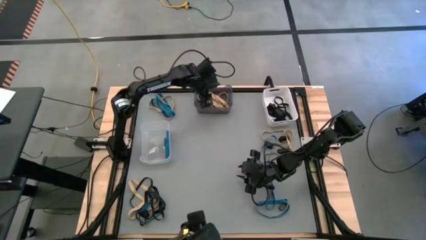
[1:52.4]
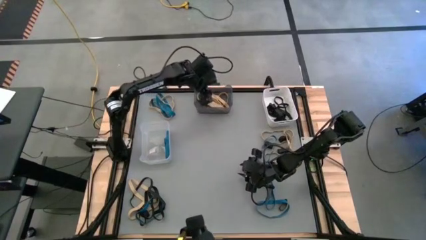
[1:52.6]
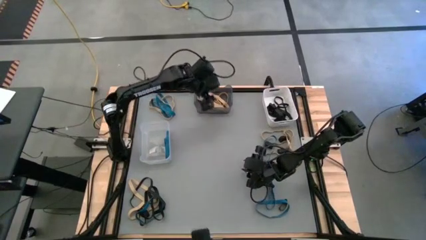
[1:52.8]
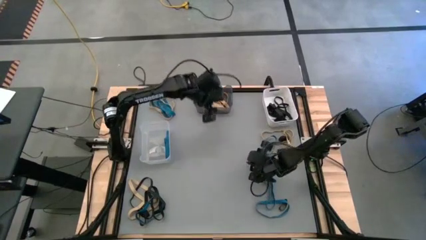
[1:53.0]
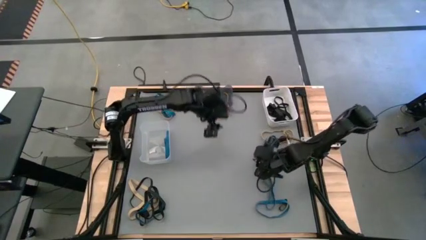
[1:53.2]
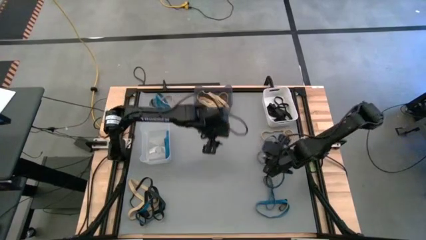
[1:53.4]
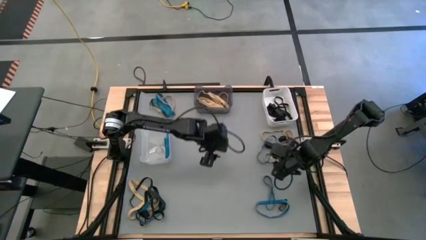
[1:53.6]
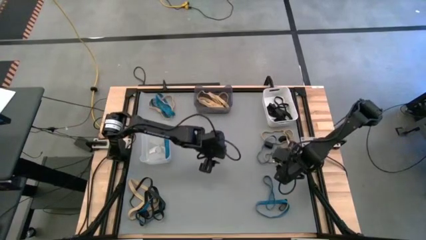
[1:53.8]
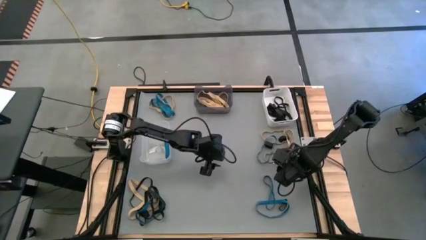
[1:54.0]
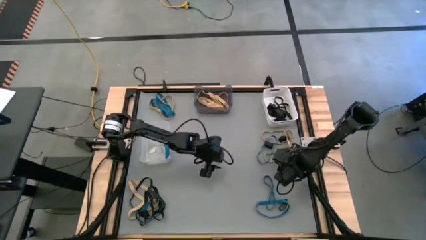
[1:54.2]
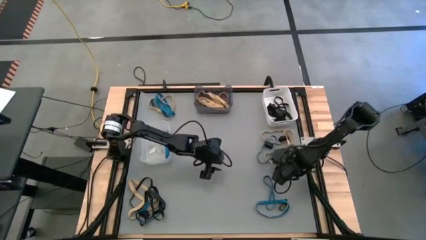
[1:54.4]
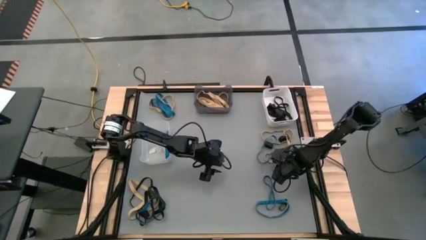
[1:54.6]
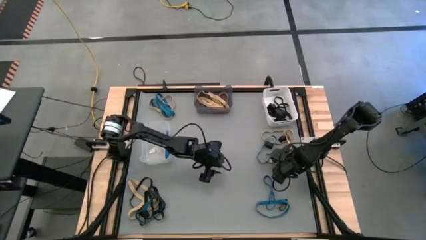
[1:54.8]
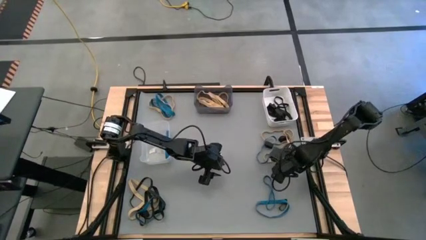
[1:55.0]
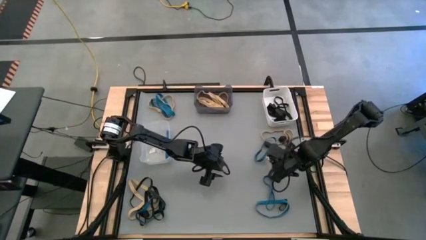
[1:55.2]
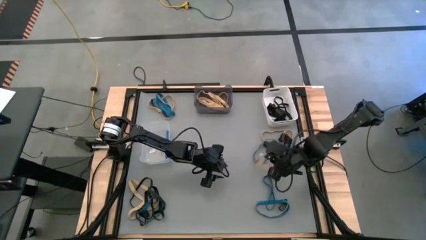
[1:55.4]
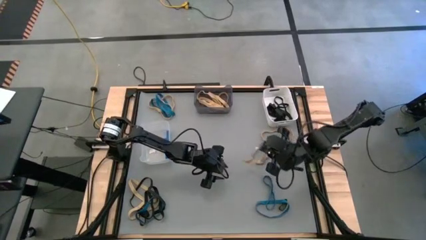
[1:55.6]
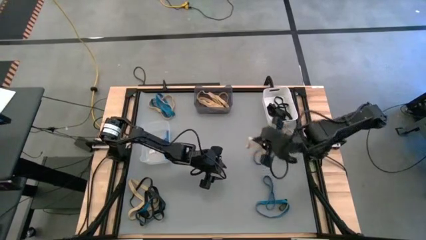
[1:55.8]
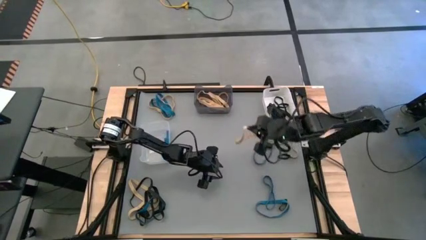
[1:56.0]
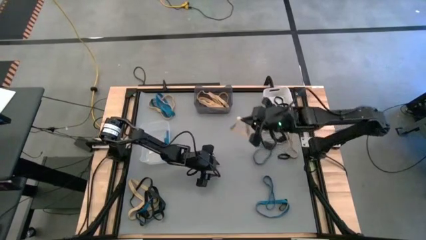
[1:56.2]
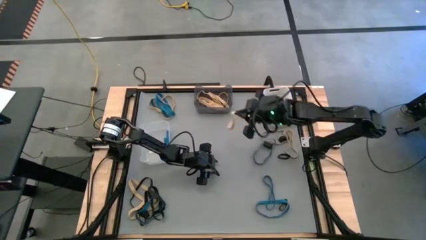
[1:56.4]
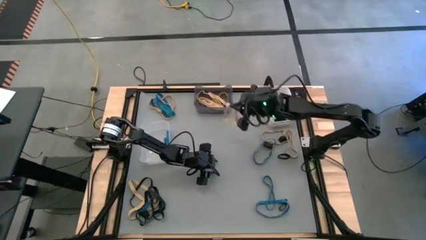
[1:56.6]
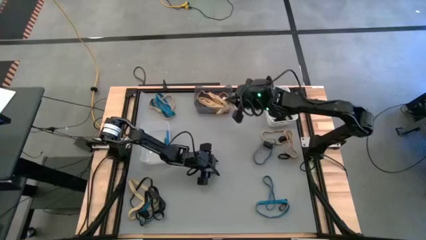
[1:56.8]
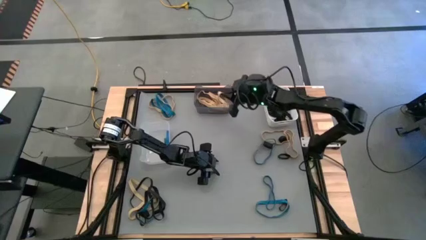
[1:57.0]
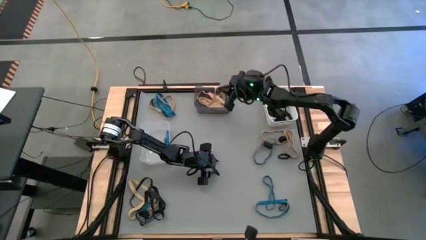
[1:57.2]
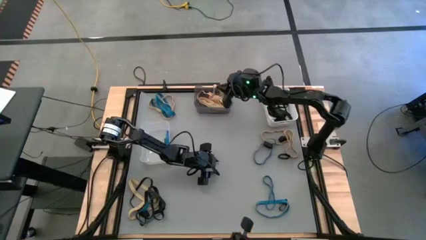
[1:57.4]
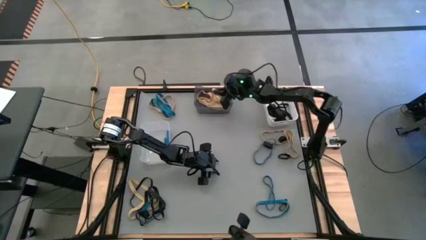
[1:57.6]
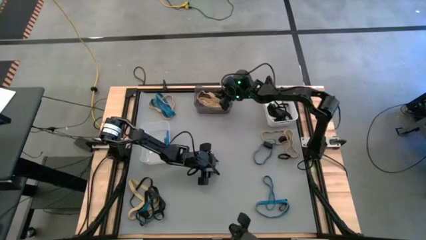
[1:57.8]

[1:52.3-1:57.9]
Task: Sort rubber bands into baskets
Put the brown rubber band into the black bin

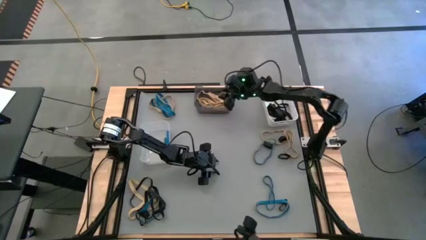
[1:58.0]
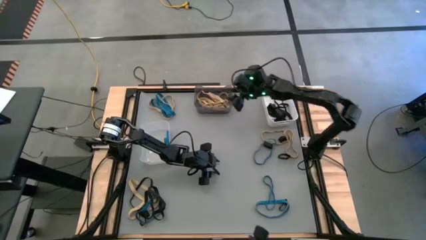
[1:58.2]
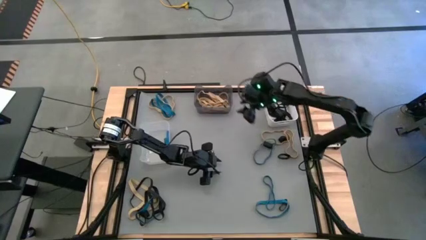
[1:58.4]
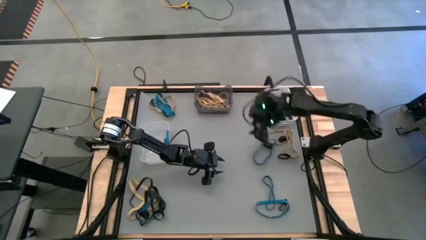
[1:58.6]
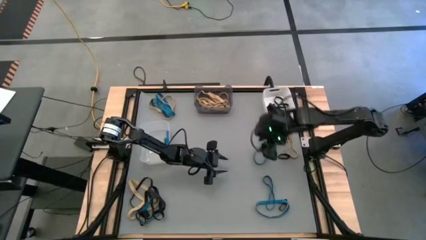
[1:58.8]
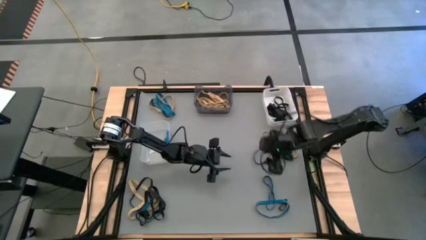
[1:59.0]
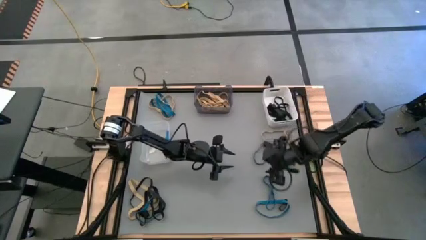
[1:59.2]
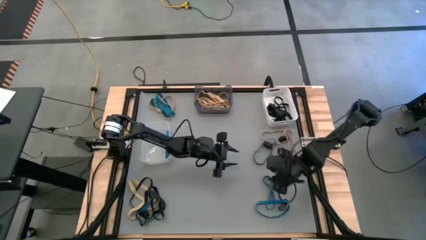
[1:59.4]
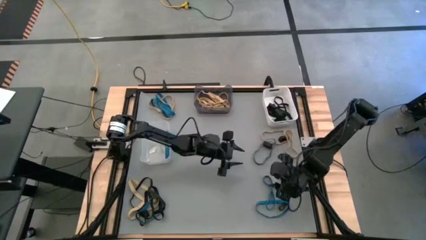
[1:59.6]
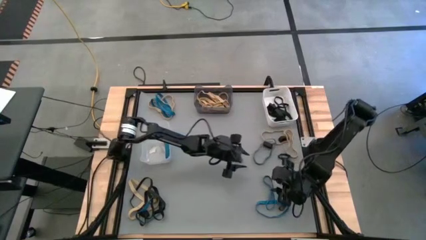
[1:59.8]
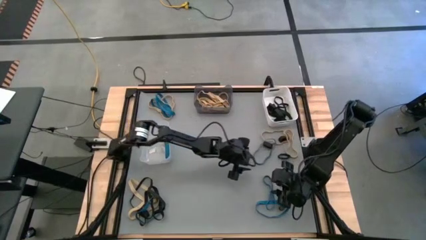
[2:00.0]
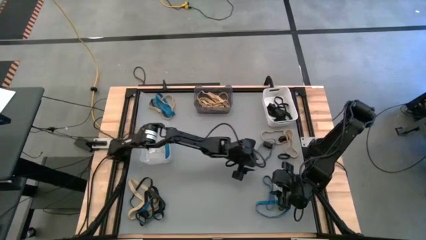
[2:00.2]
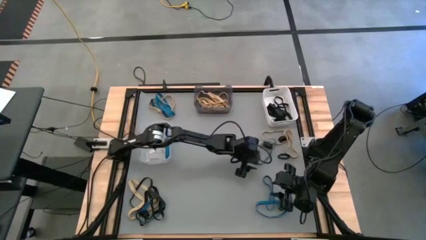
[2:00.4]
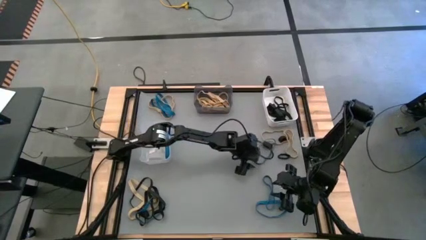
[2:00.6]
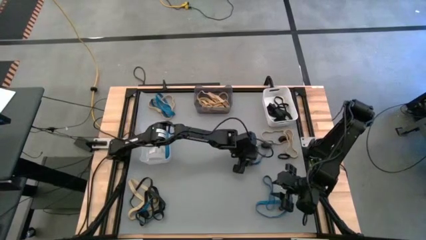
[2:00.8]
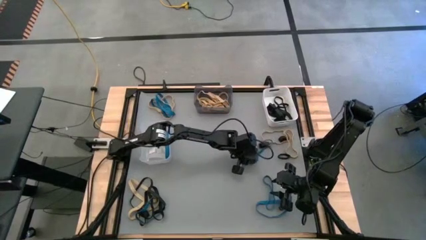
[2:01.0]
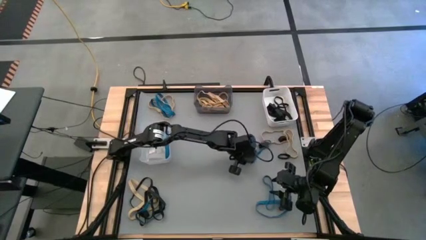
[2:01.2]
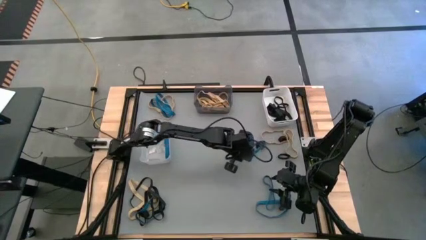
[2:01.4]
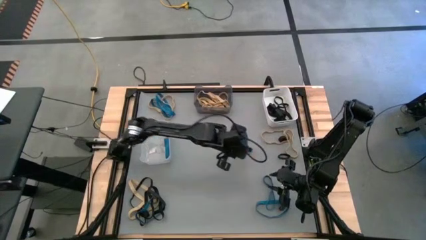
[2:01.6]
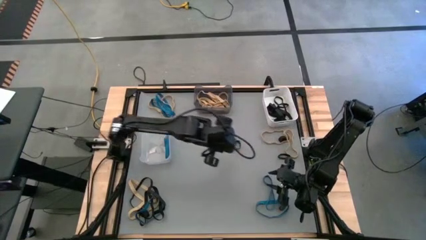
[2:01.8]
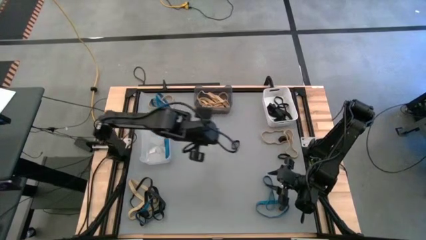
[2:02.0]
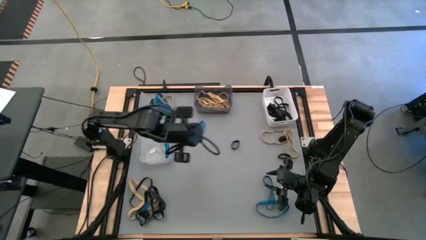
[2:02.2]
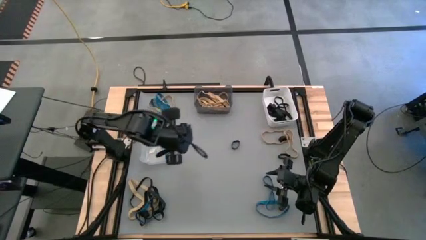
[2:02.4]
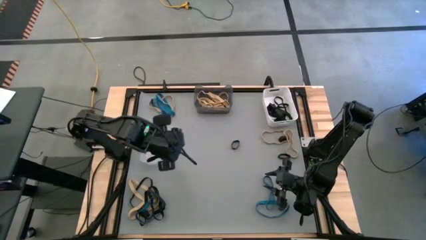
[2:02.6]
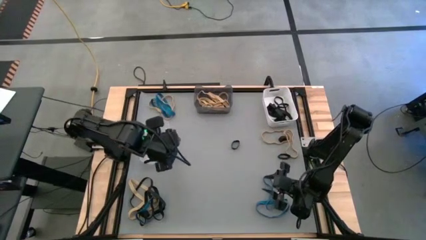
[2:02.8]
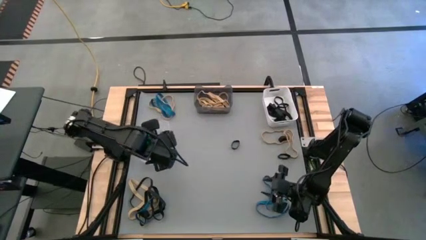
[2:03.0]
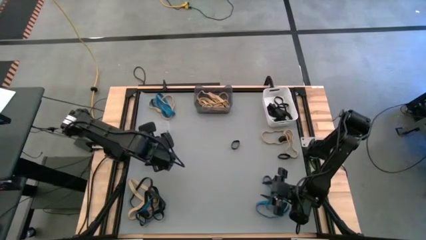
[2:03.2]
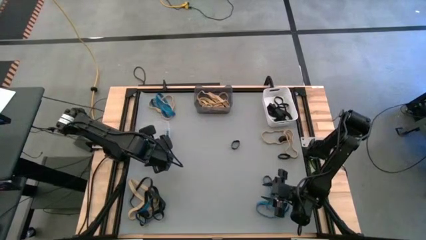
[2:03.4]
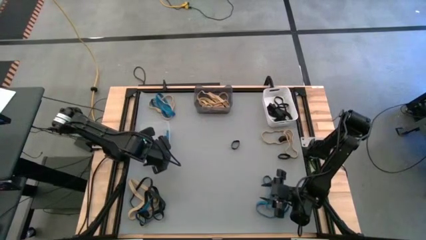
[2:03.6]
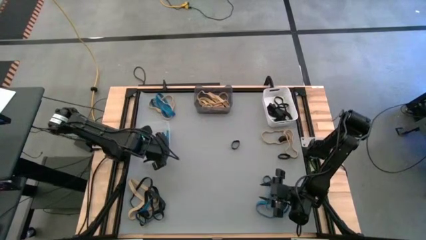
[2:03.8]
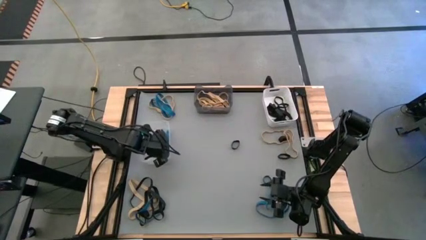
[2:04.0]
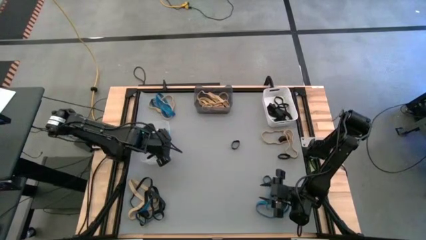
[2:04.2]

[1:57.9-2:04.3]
Put the blue rubber band into the transparent bin

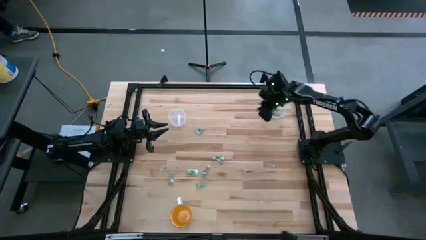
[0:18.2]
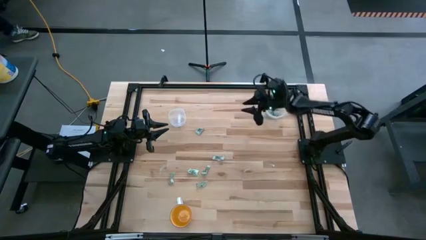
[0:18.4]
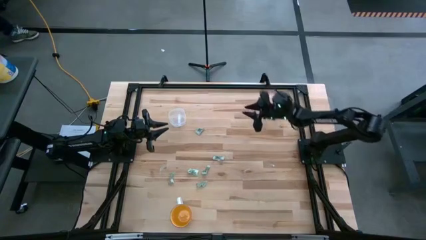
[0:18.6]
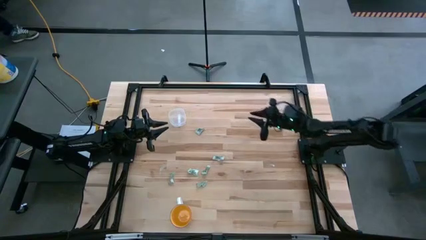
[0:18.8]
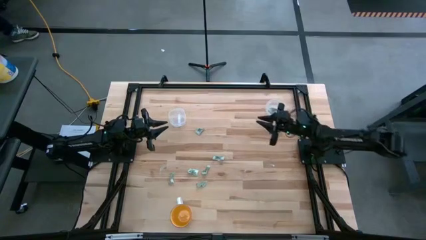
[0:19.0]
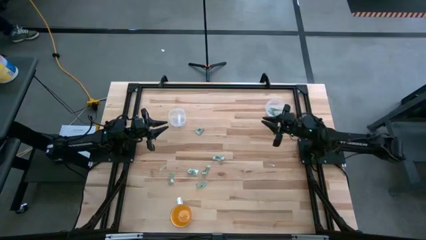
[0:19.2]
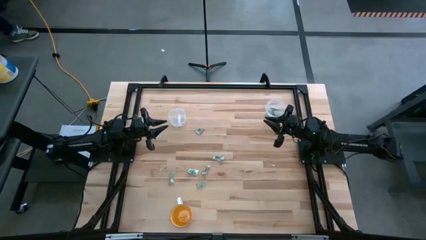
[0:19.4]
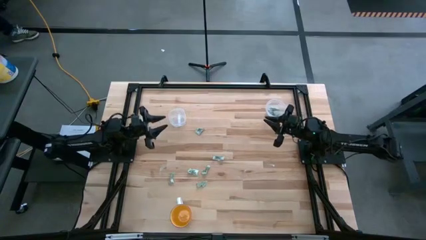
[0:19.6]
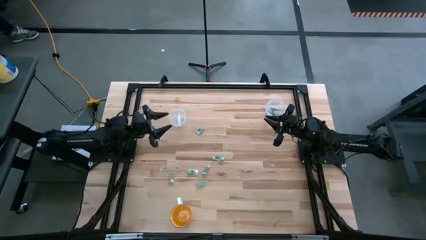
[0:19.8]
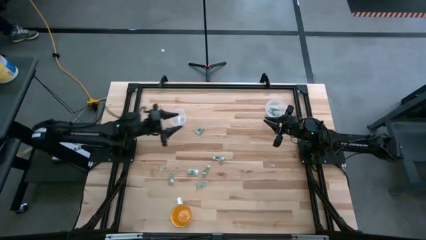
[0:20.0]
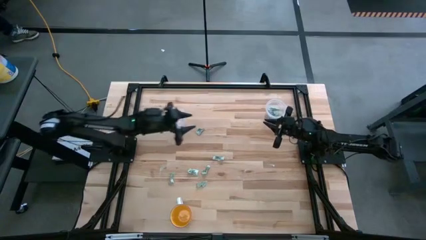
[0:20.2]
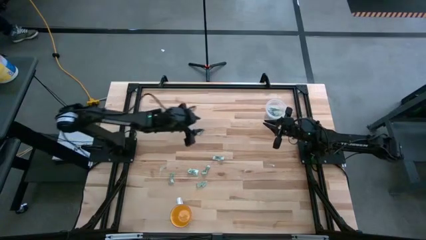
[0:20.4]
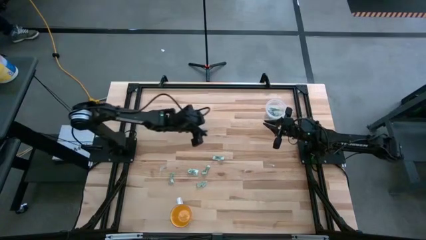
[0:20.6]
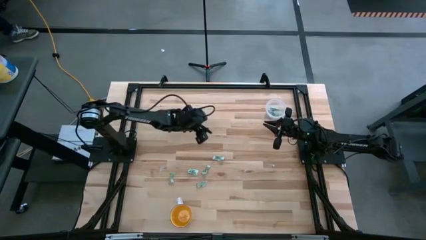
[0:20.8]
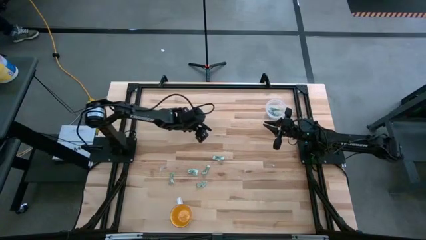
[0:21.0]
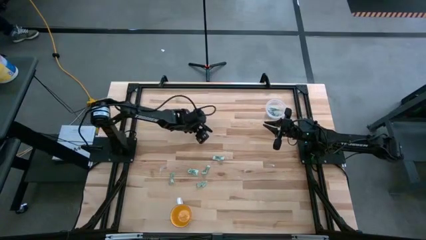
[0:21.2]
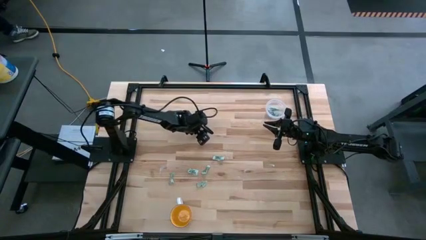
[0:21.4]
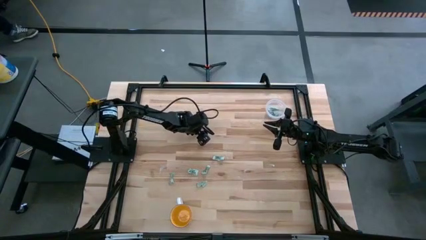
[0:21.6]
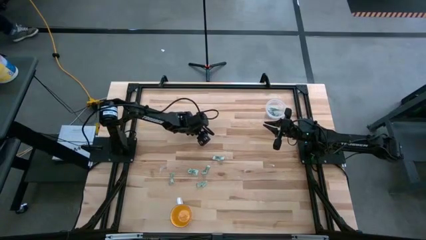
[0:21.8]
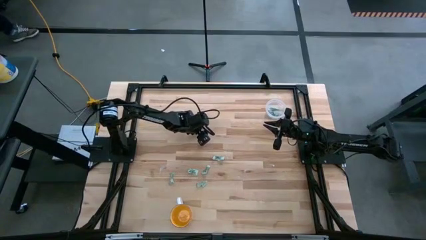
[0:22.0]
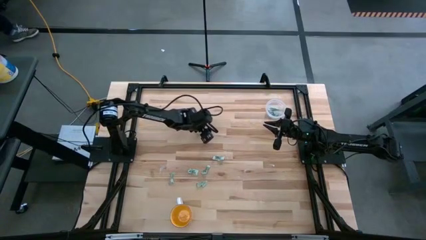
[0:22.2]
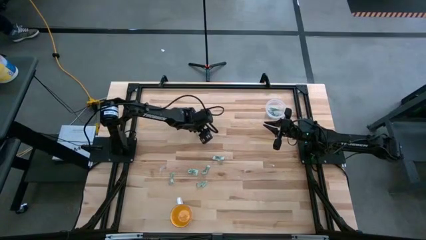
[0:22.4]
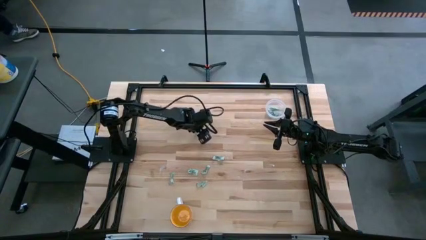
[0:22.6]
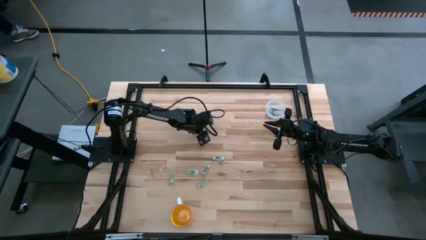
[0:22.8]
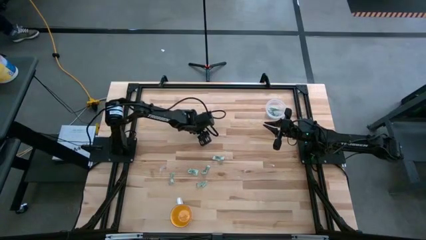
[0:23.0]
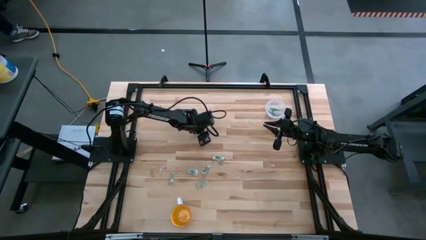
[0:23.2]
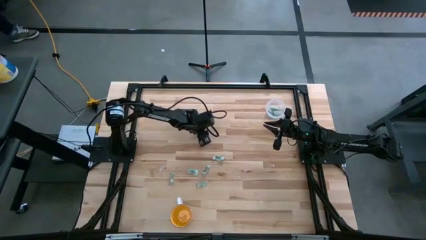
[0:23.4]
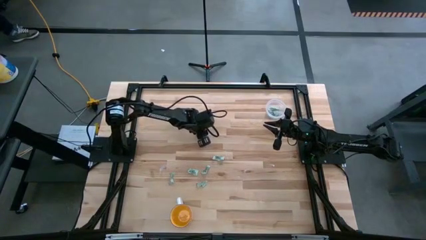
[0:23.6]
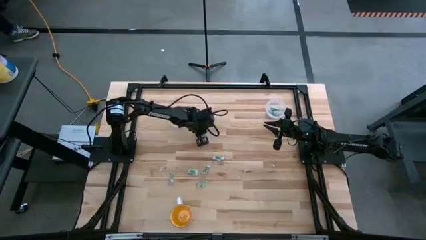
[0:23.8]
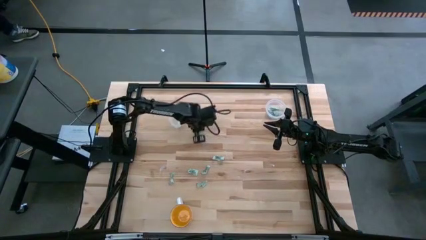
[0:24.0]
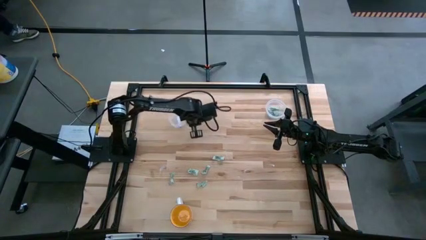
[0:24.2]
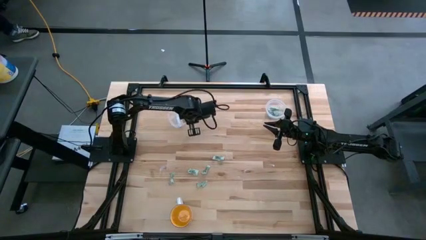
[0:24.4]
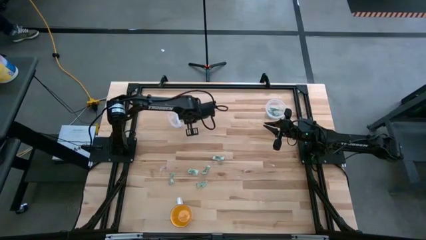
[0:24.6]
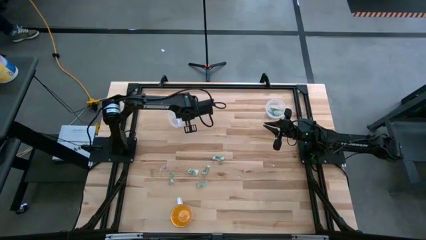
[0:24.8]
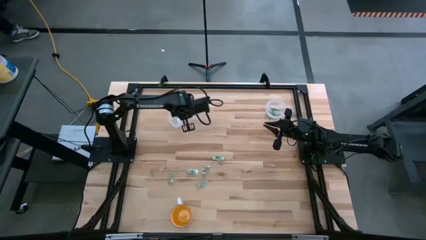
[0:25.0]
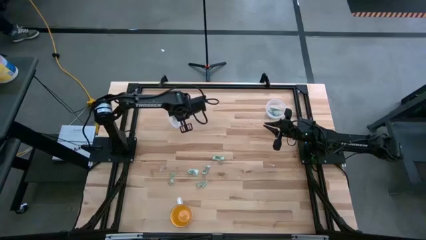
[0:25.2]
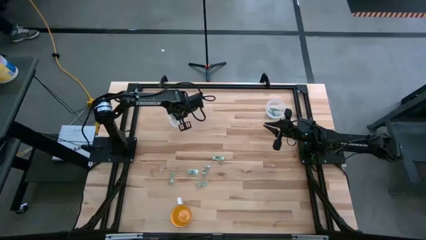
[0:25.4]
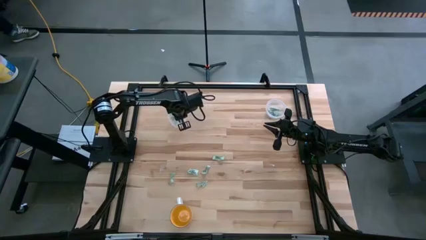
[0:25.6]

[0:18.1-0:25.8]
Task: Pick and place items into bin
Put the stevia packet into the left transparent bin
